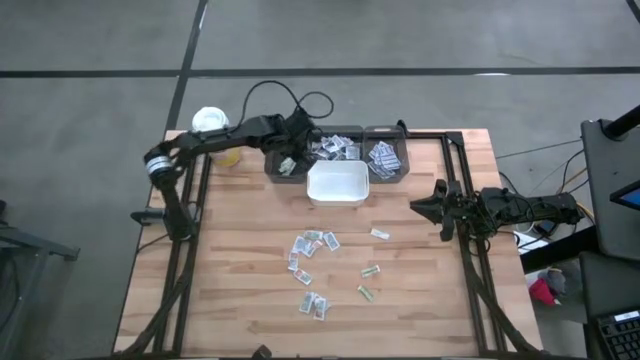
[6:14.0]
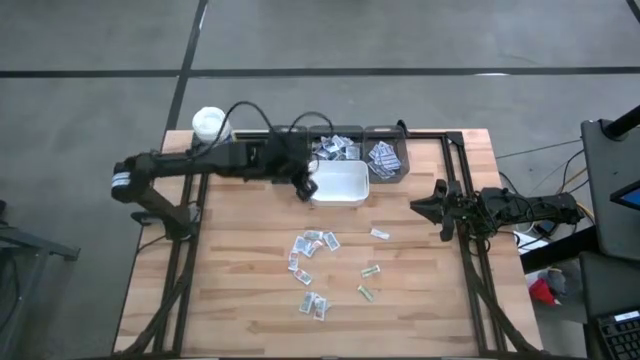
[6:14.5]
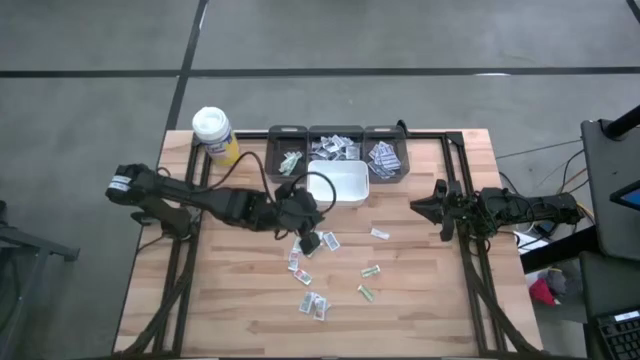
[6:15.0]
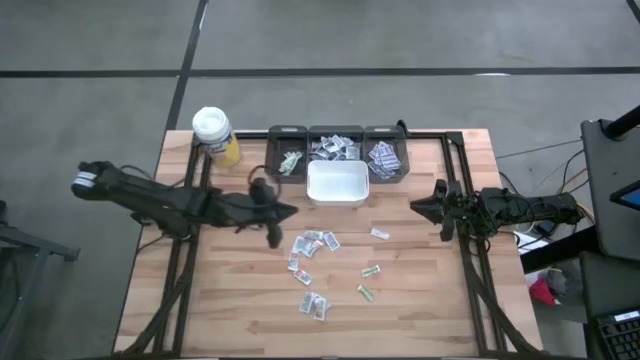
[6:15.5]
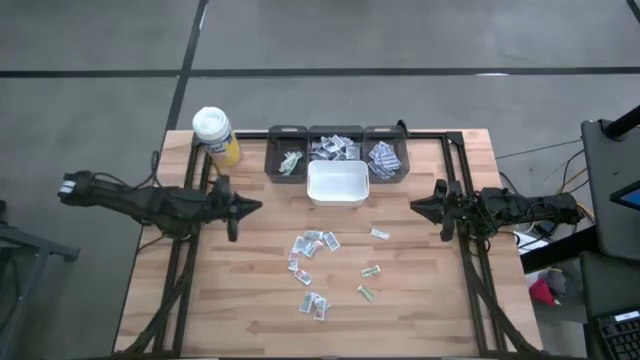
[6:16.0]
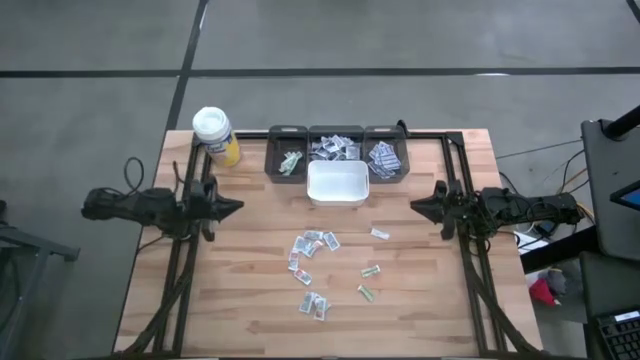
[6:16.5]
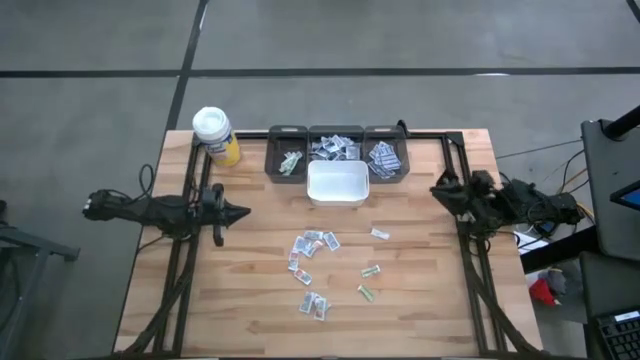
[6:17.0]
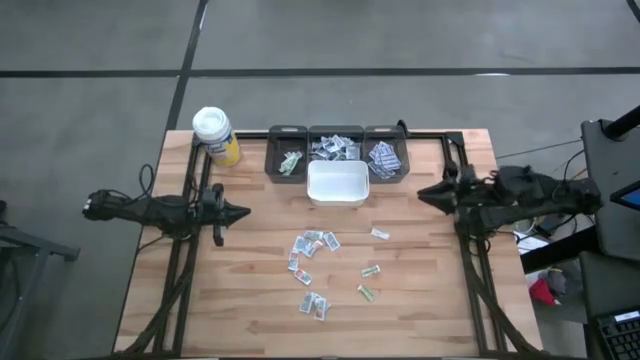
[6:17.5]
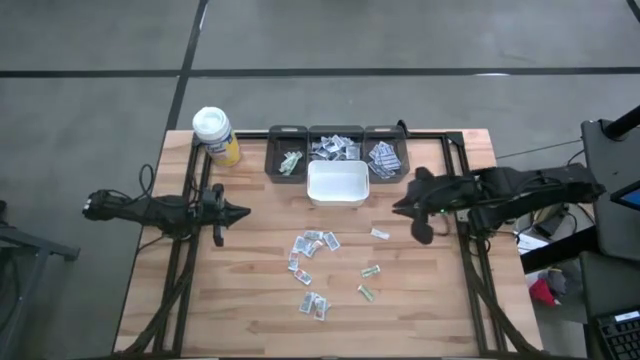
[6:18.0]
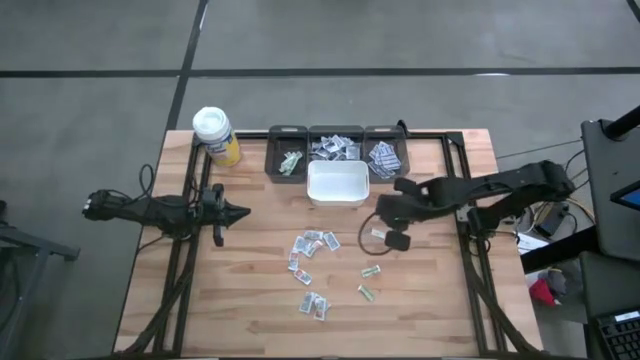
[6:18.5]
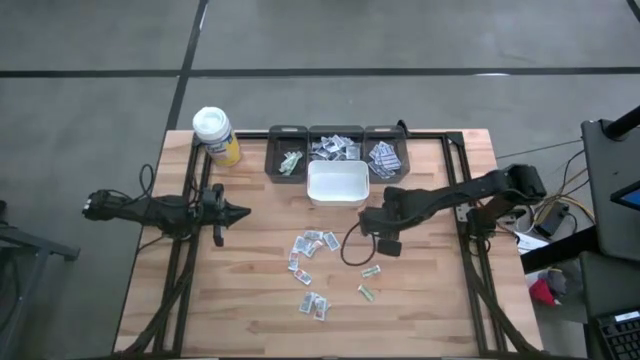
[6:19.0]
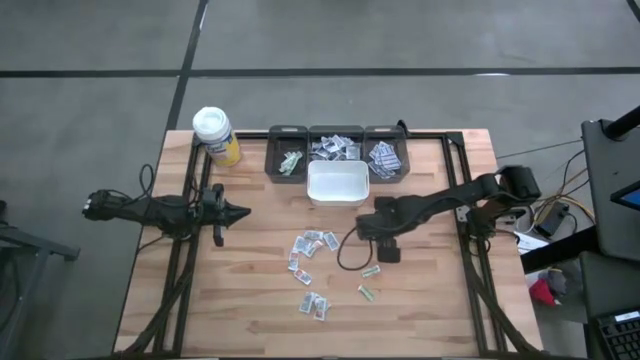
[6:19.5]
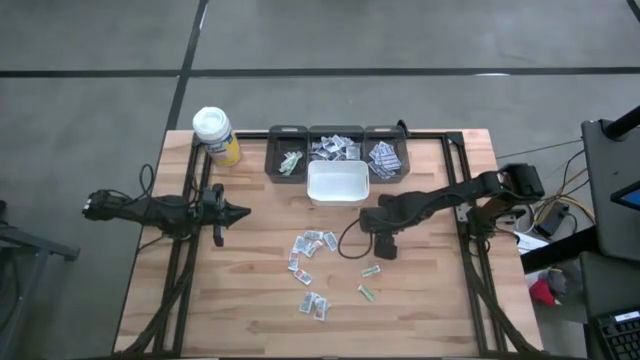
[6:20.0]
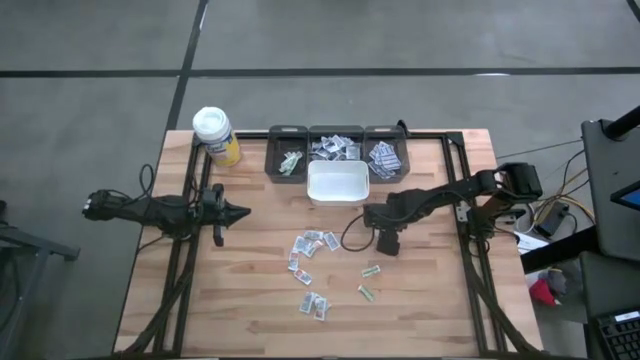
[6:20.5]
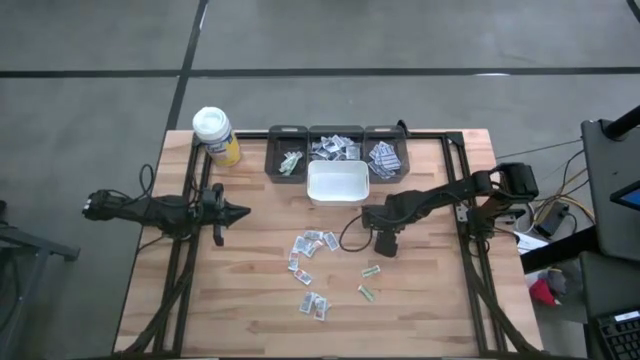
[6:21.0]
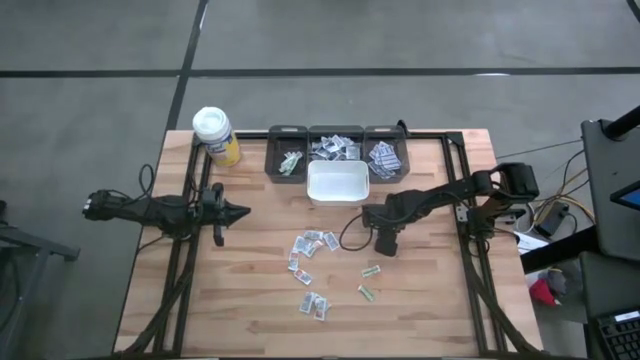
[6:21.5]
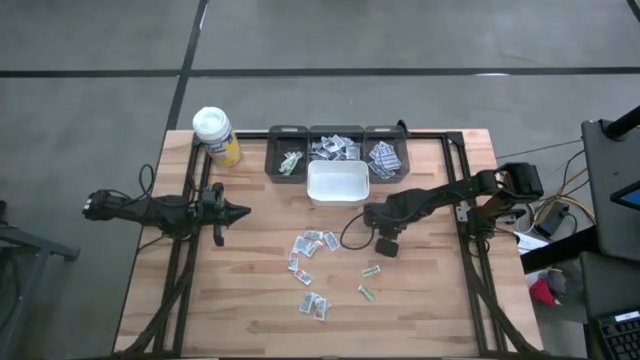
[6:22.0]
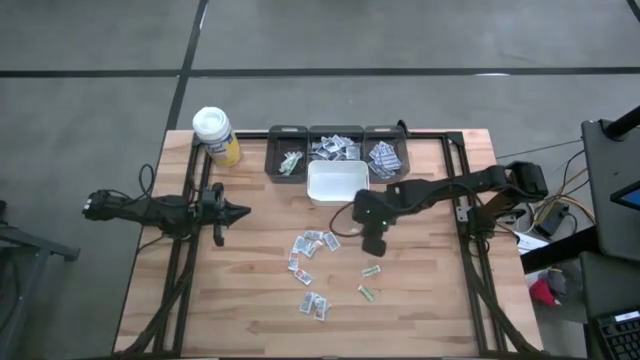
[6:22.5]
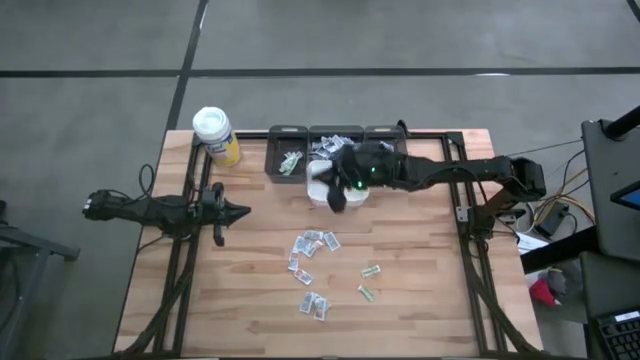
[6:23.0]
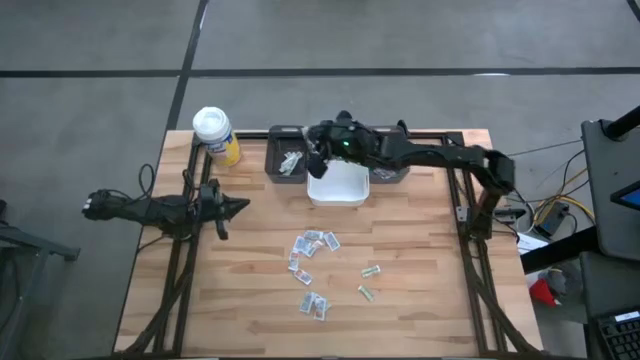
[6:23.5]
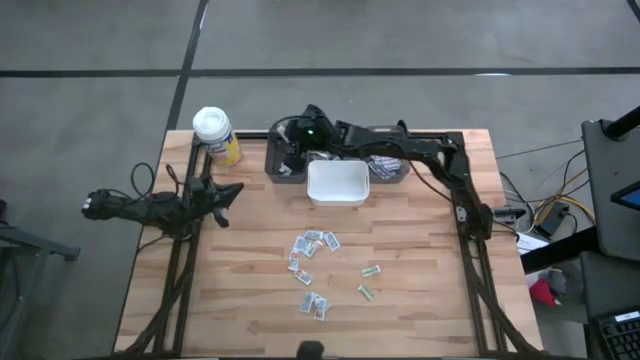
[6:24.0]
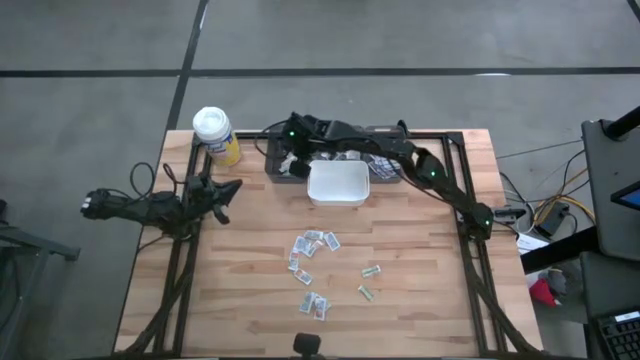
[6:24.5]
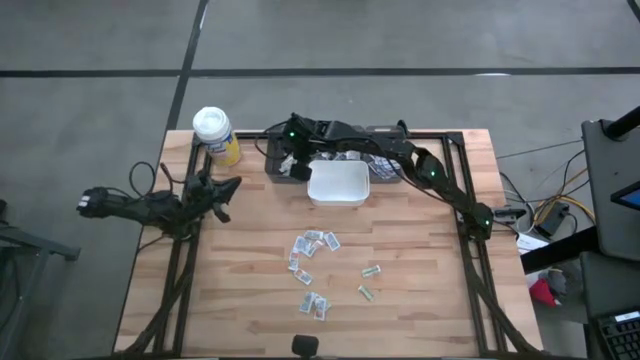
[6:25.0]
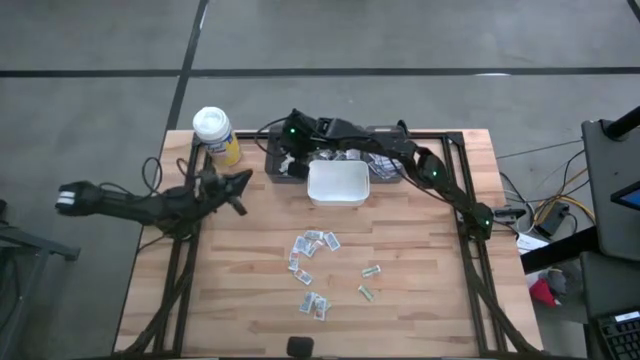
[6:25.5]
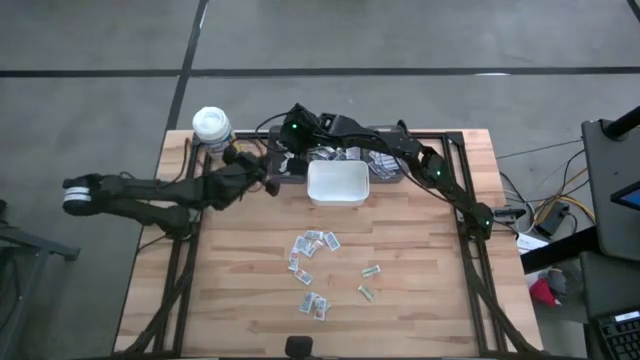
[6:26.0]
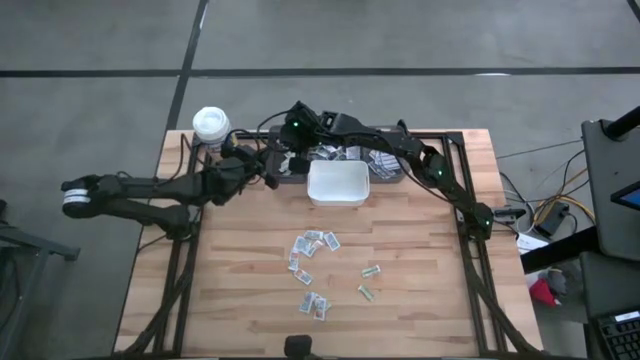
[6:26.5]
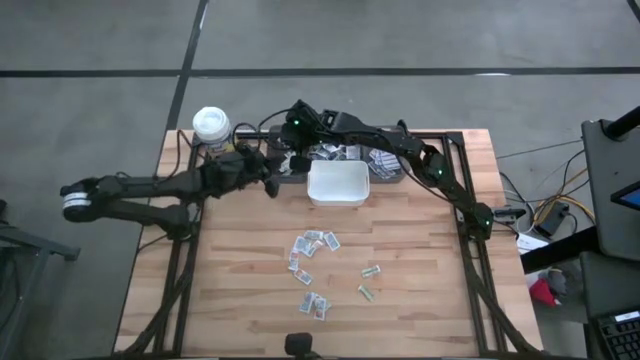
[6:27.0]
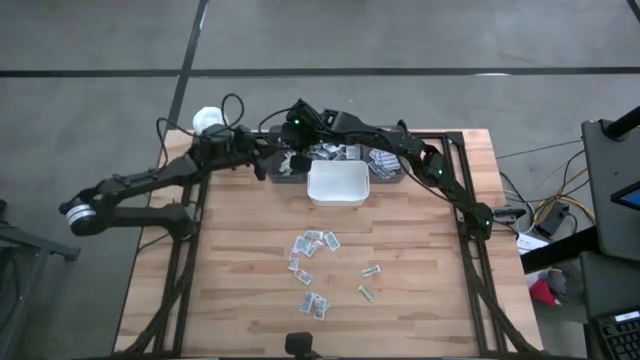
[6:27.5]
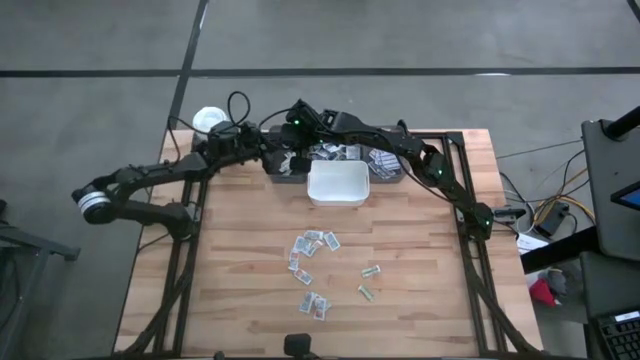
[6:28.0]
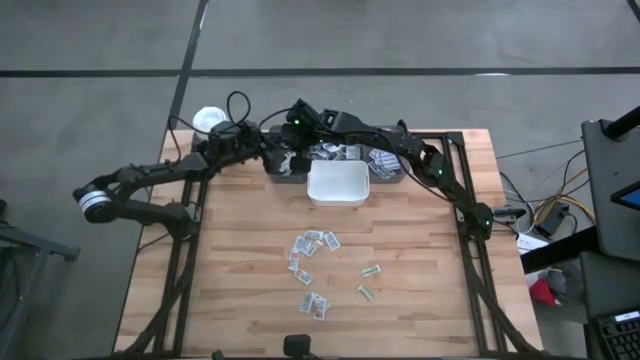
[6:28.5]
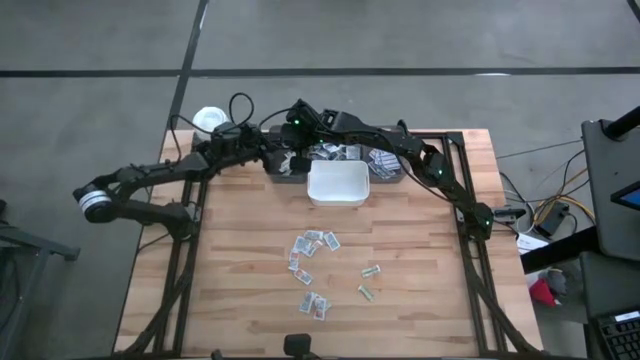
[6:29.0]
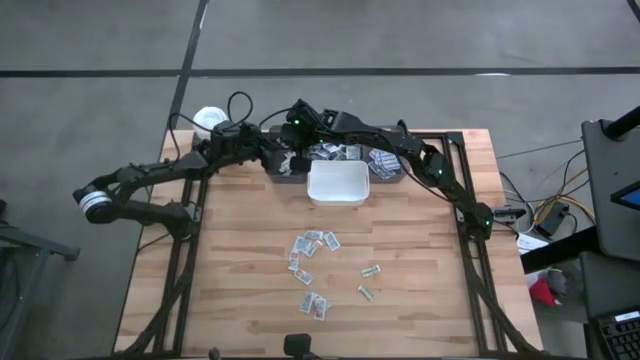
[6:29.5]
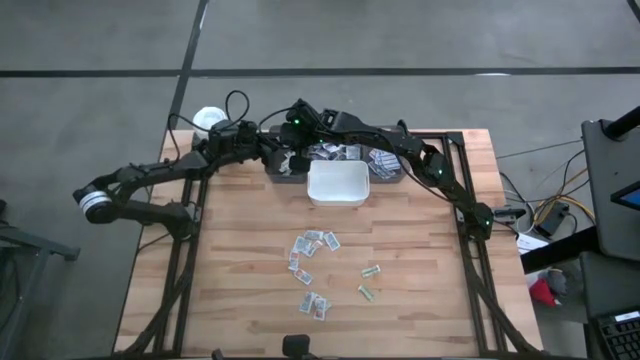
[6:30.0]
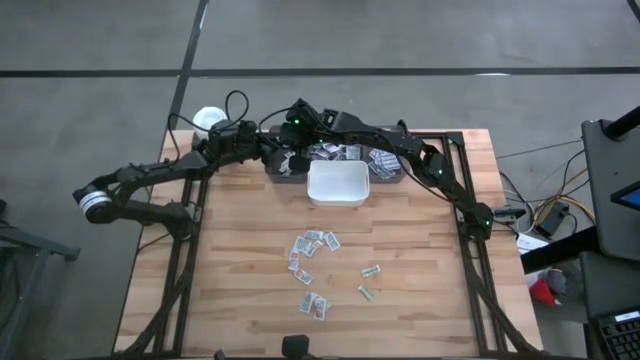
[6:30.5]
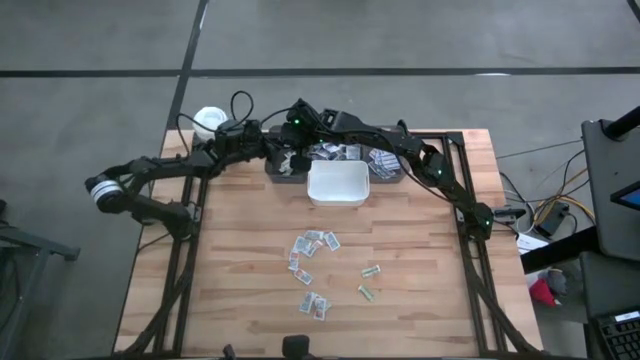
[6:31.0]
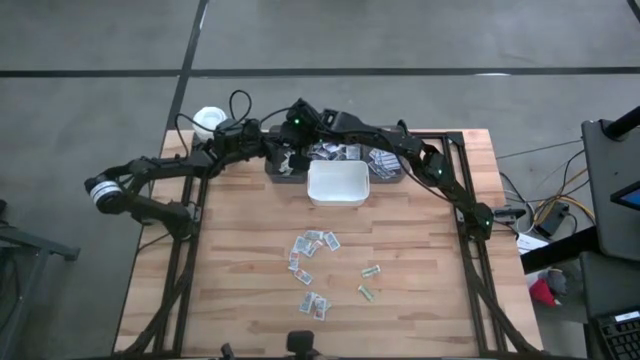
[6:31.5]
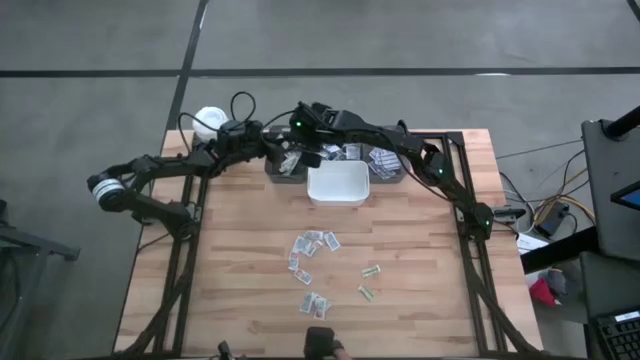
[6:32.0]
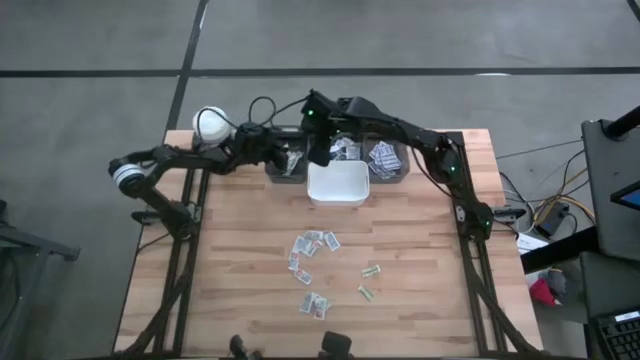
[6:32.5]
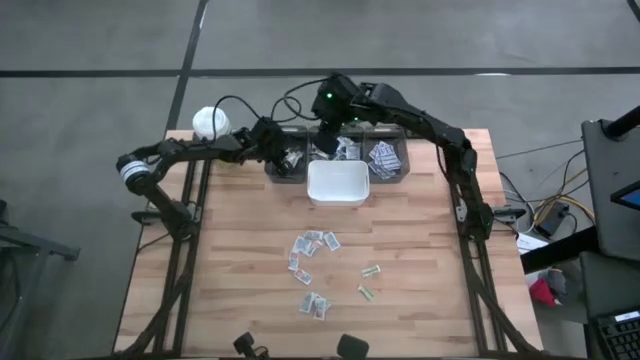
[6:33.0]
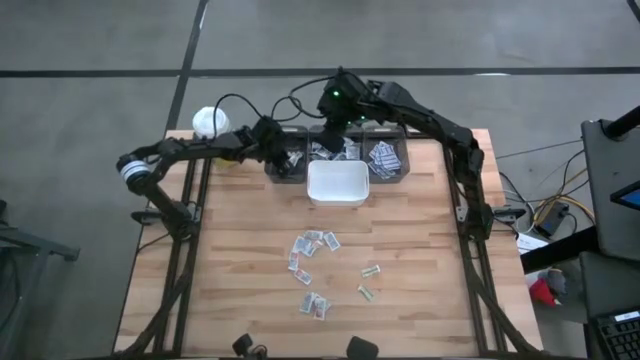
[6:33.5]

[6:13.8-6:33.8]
Task: Pick & Place First Aid Supplies
Put the top green bandage pack into the left black bin
